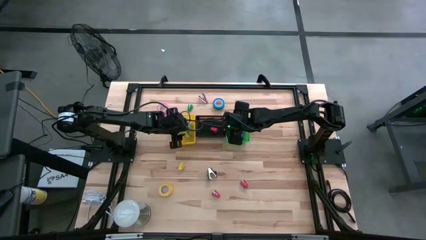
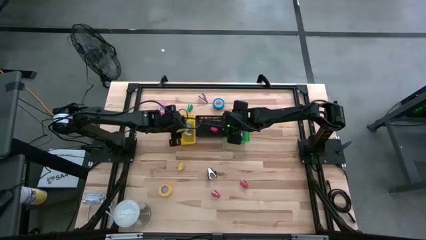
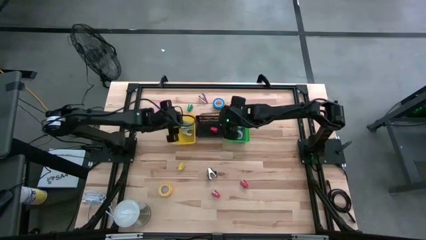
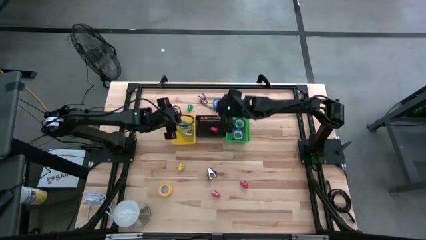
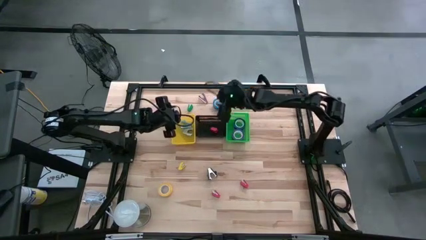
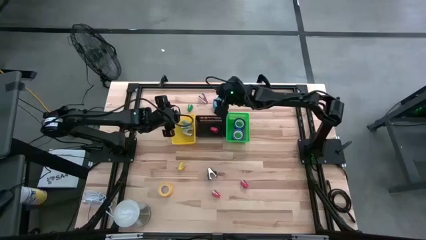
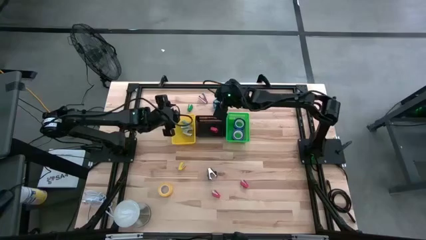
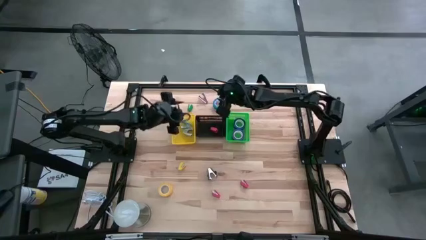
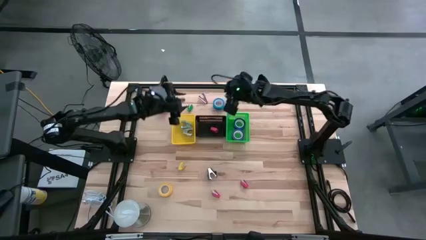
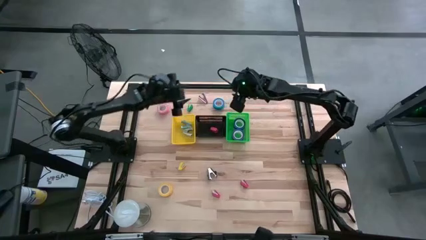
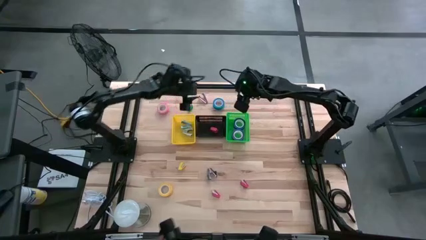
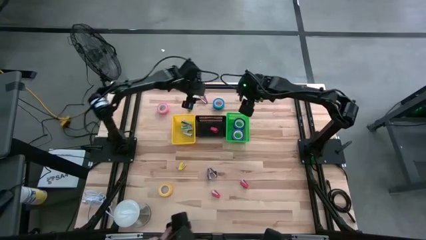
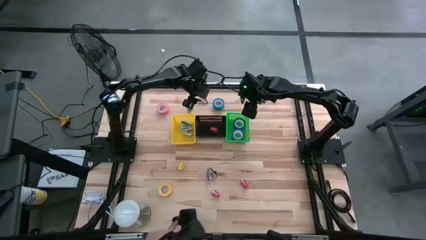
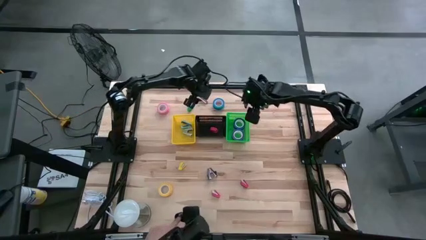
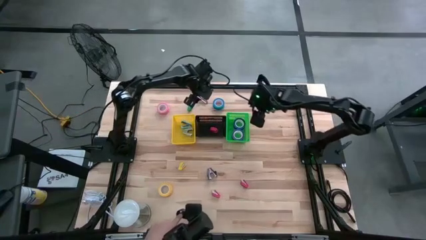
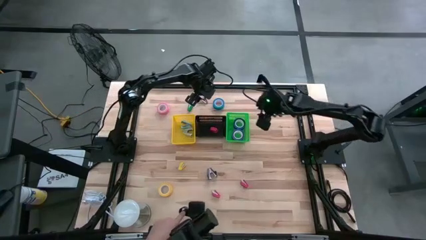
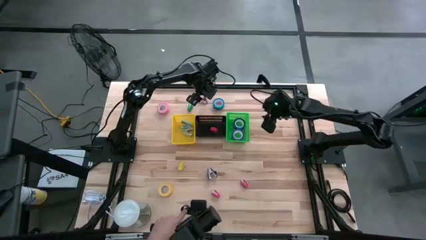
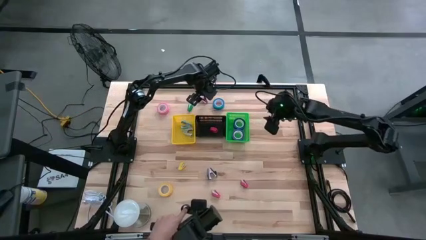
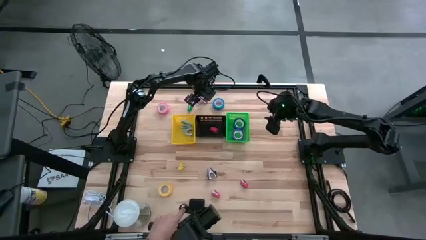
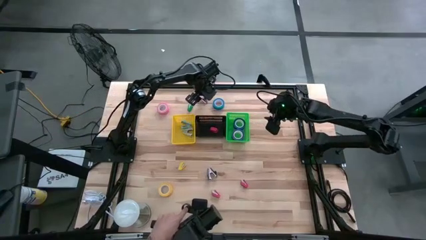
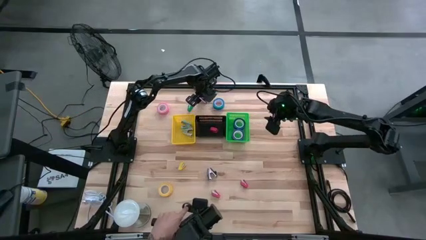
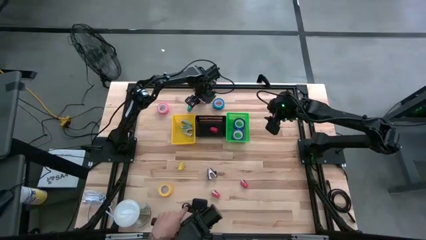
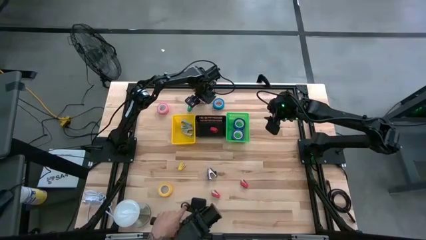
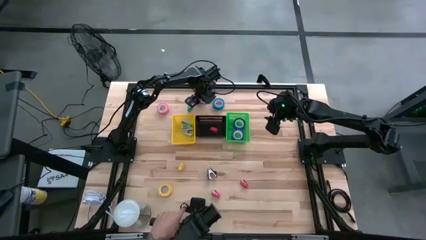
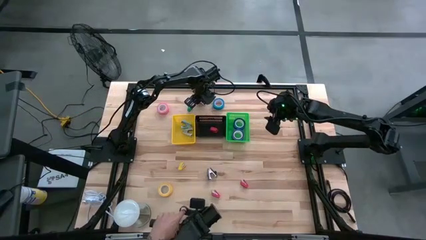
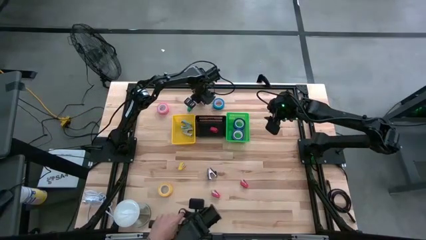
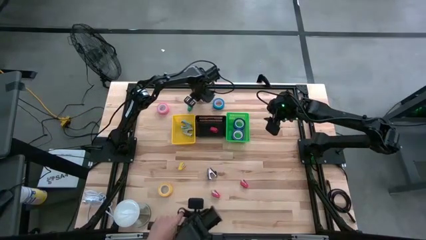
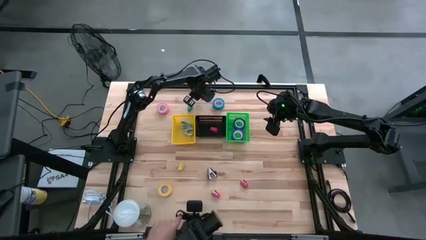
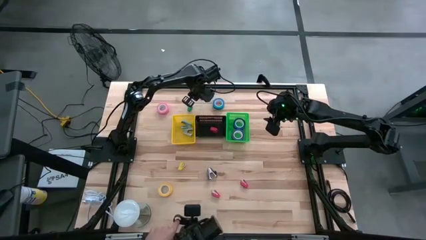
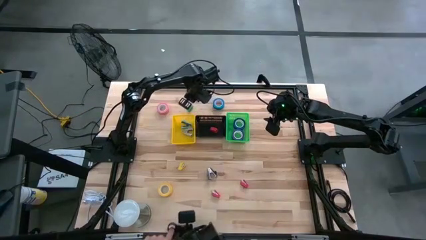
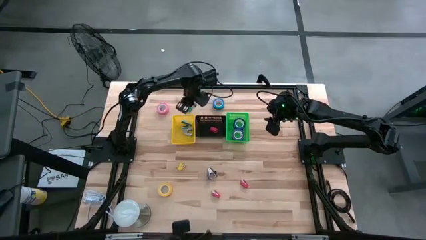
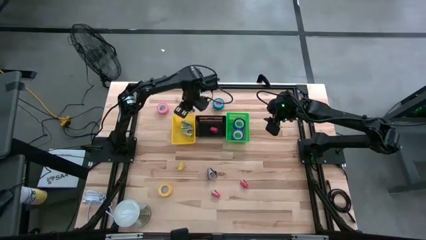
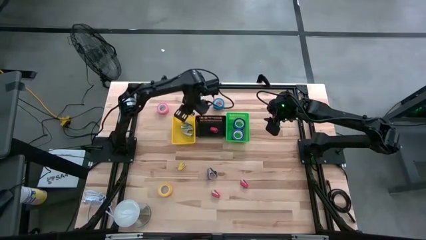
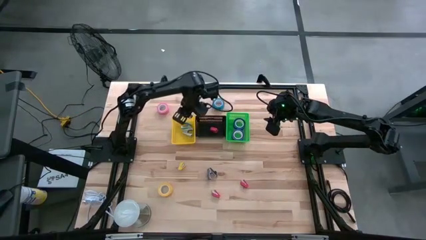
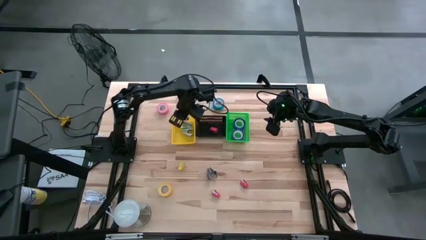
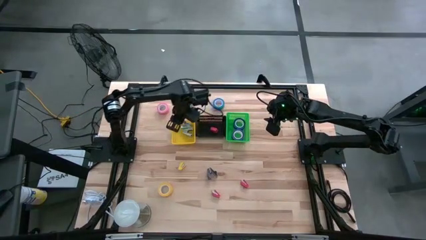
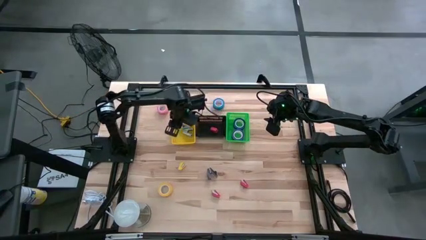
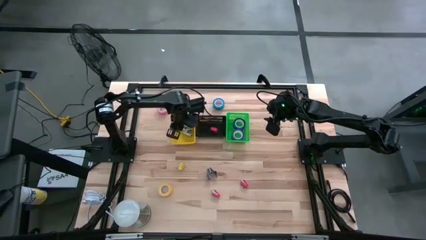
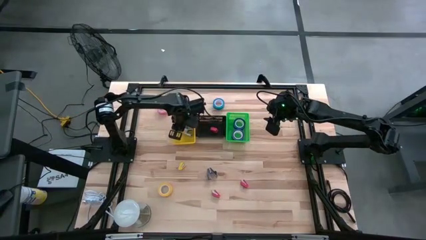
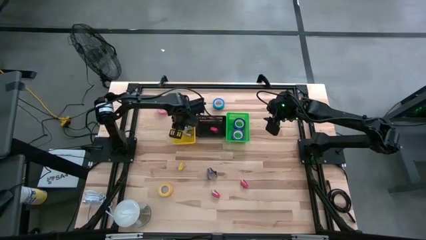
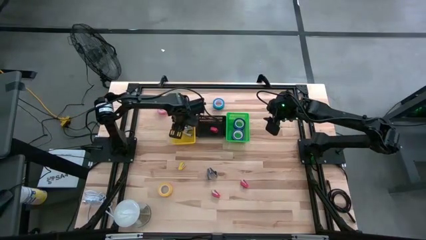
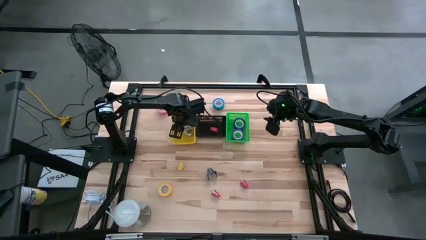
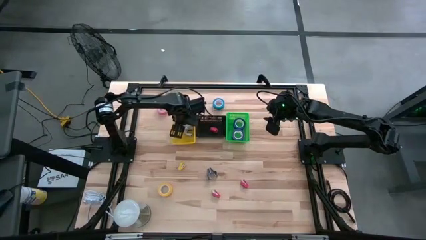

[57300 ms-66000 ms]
Task: Pick and place Stapler, Stapler remover, tape
Put the pink staple remover into the yellow bin

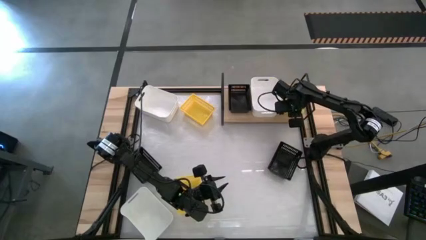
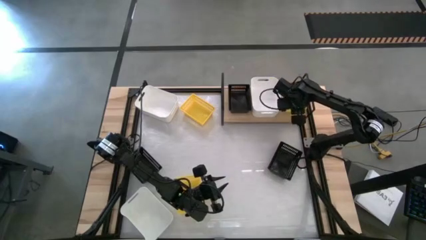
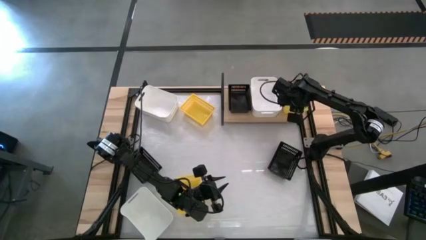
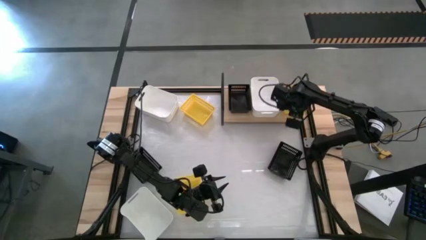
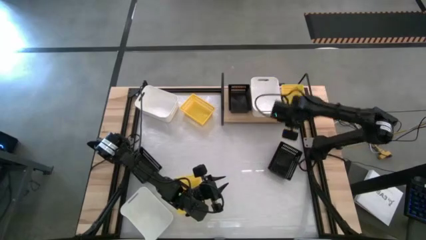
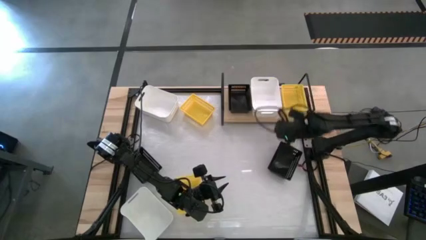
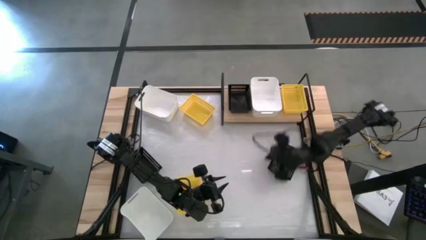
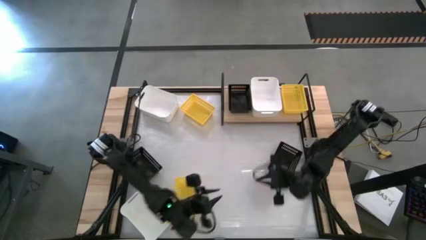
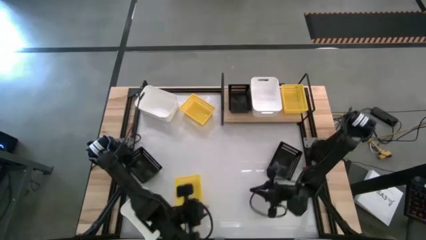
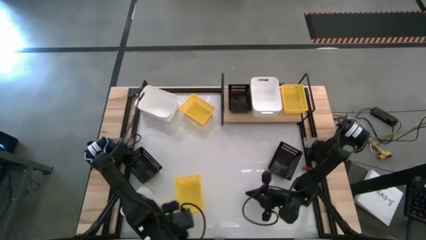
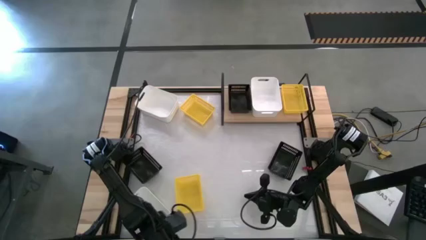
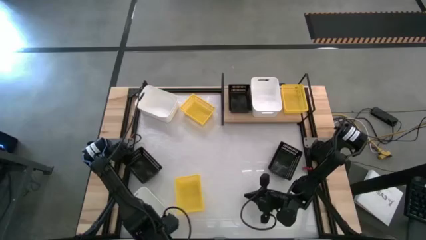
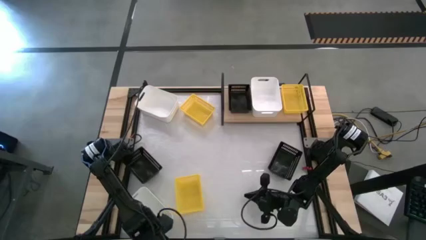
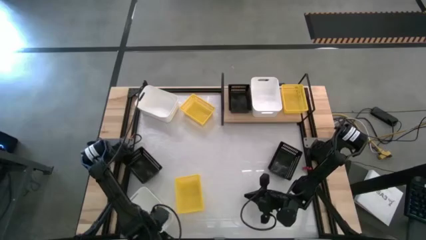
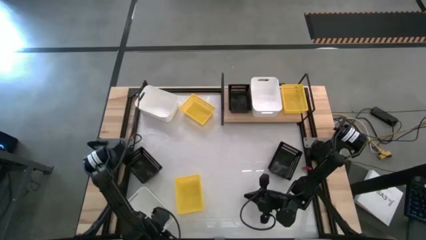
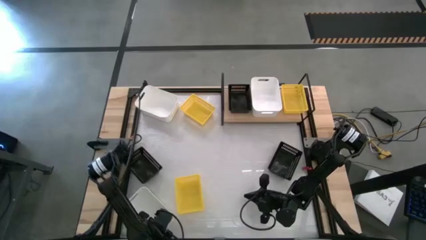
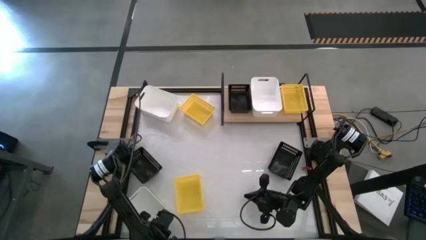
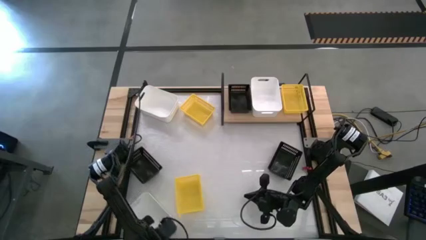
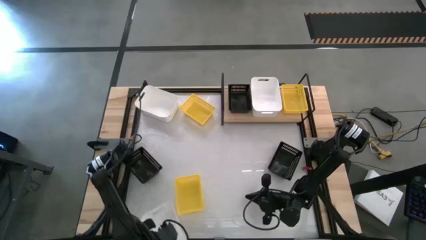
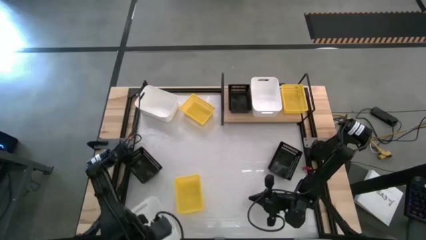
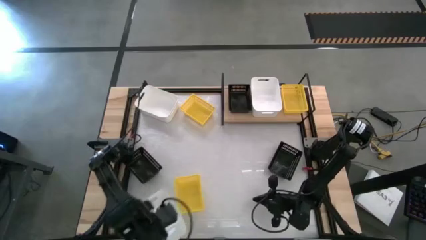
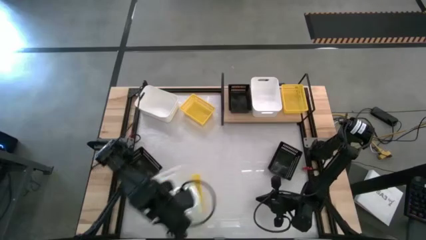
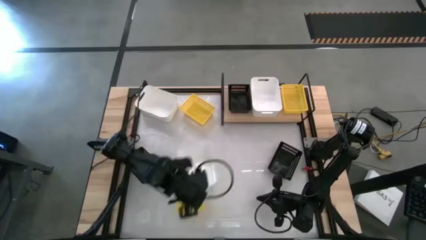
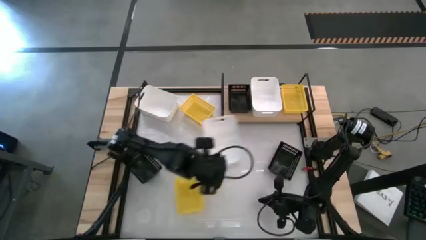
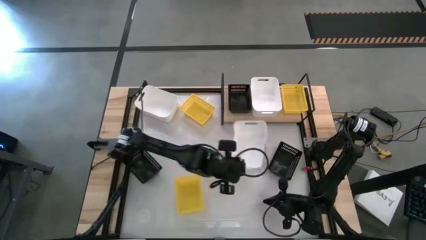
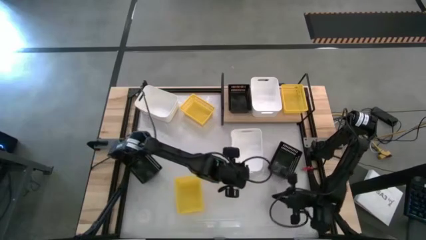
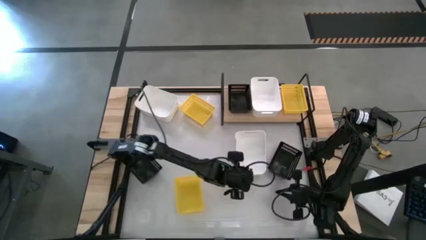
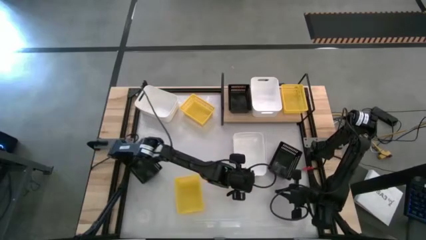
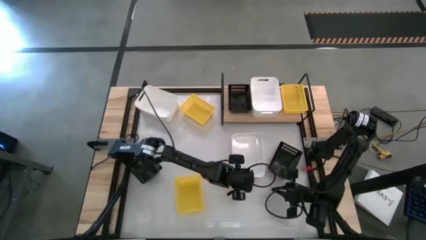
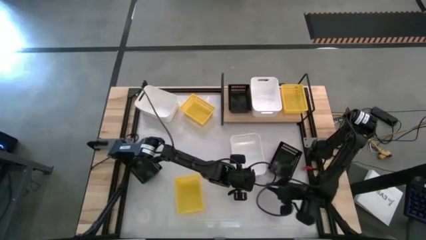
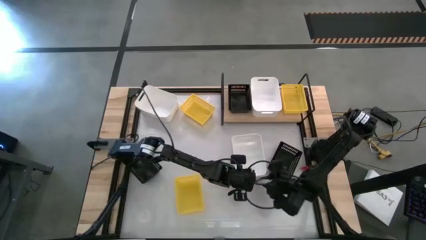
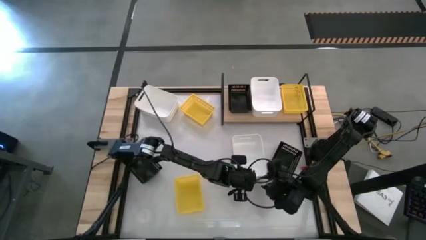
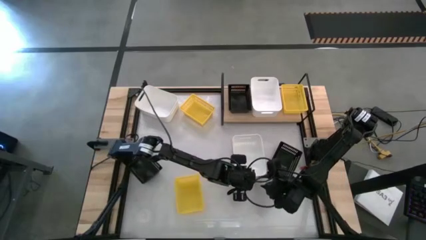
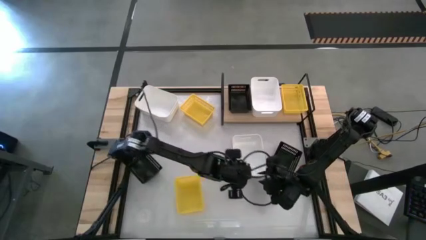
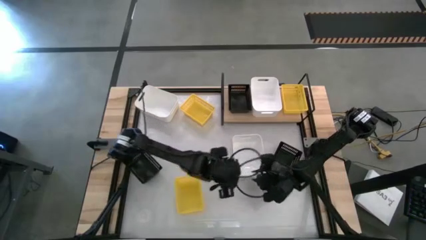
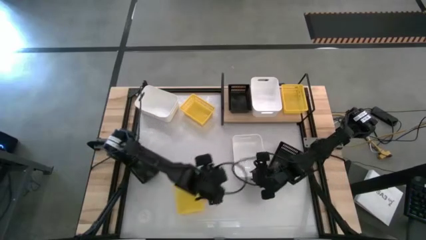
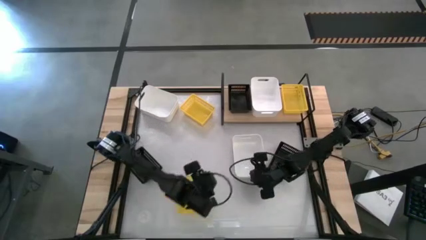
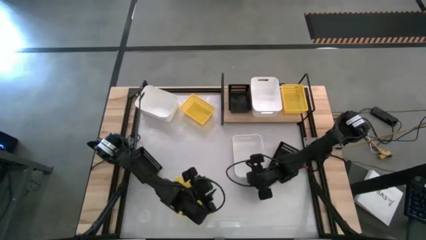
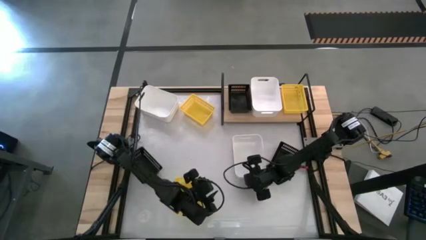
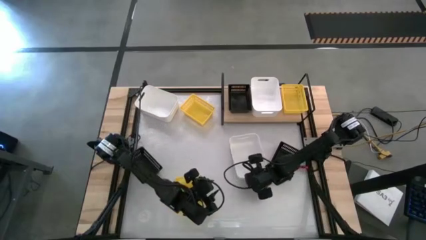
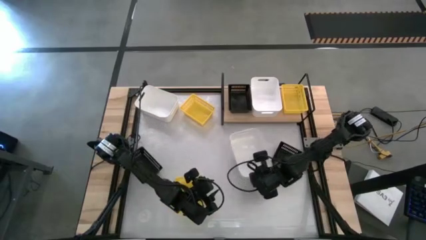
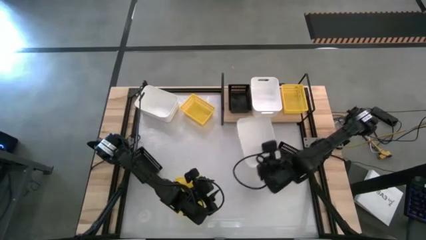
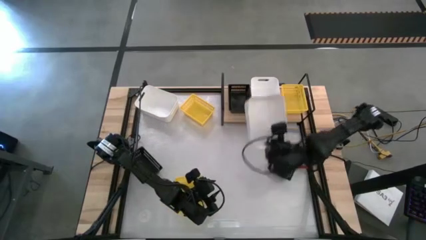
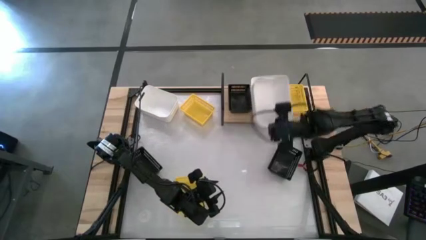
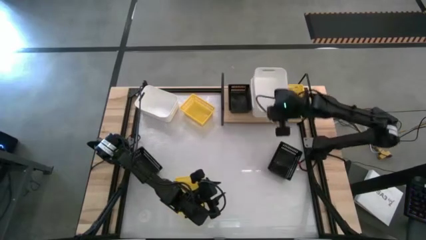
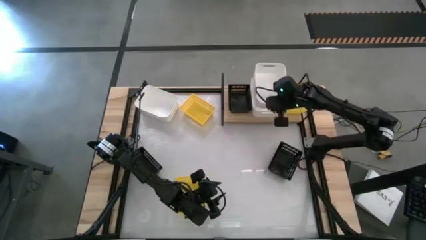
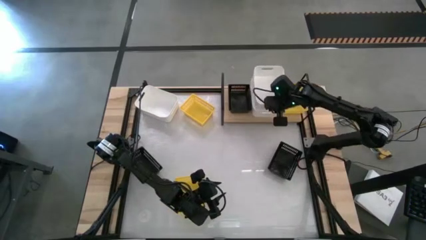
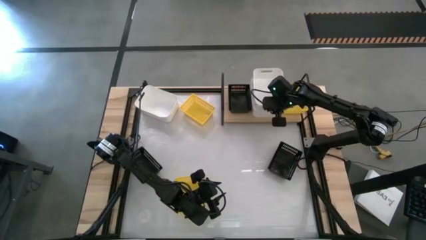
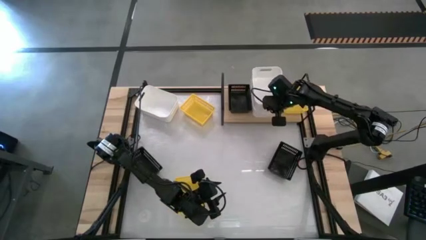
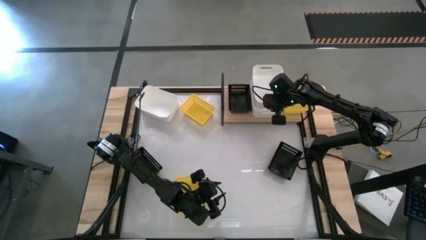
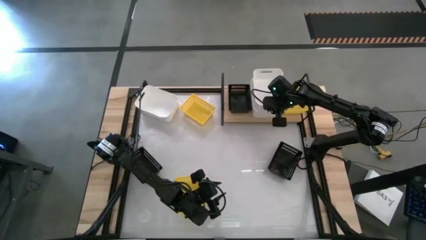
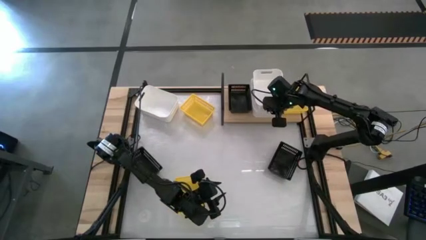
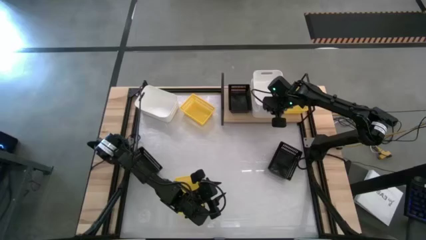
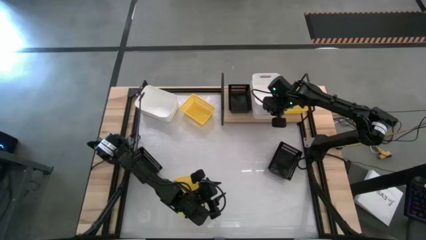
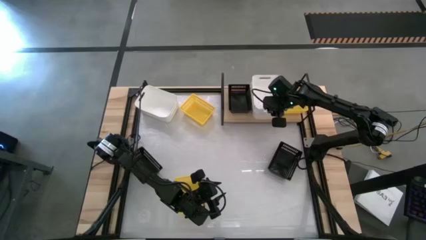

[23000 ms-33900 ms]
Task: Stack baskets on shelf by color
Stack the bottom white bin into the white bin on the shelf
